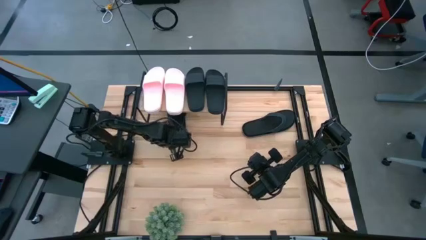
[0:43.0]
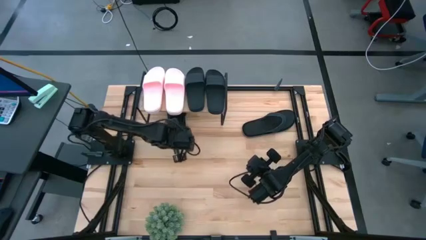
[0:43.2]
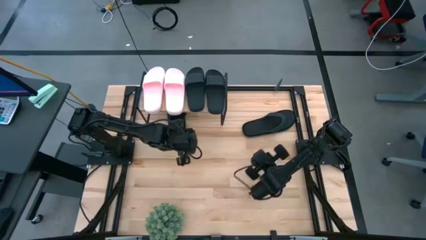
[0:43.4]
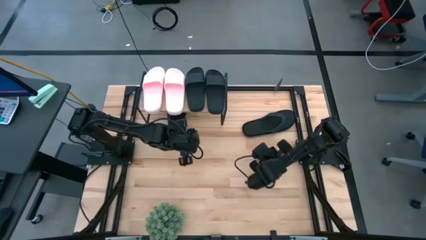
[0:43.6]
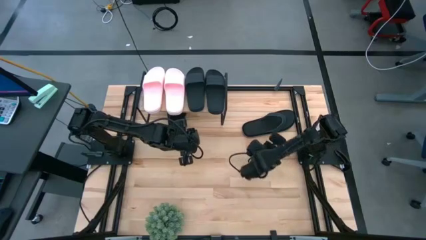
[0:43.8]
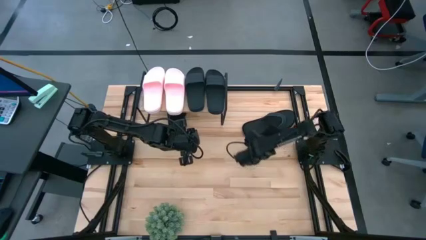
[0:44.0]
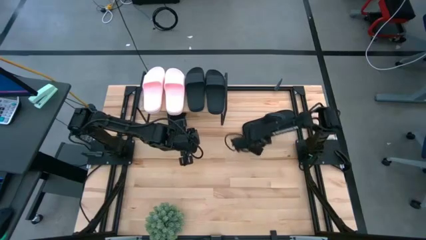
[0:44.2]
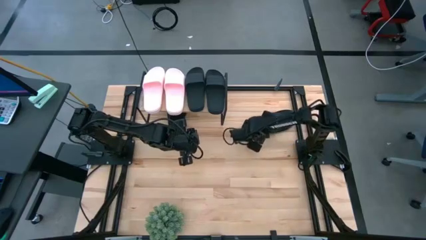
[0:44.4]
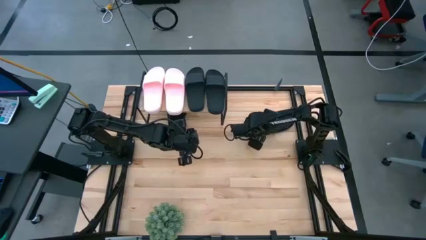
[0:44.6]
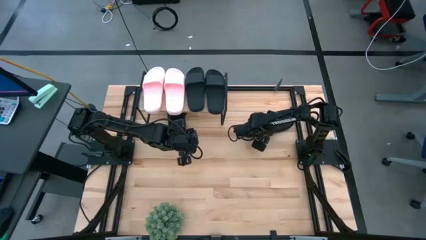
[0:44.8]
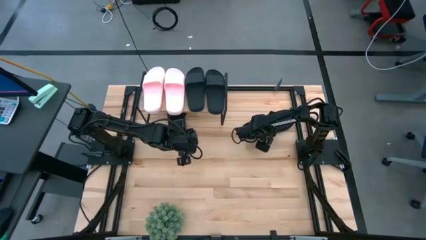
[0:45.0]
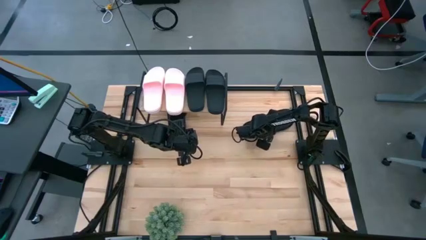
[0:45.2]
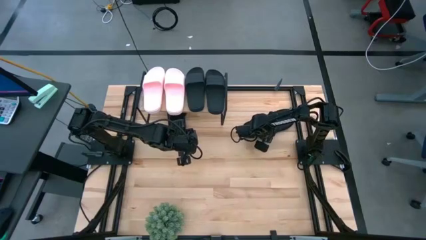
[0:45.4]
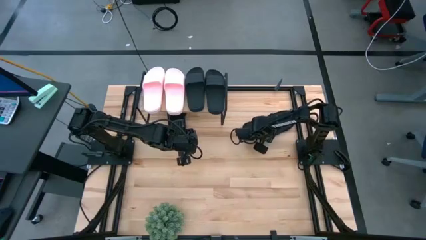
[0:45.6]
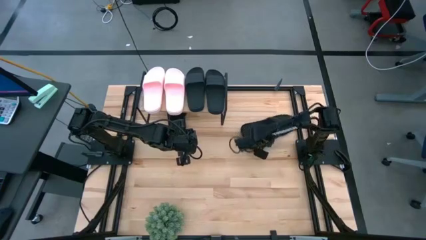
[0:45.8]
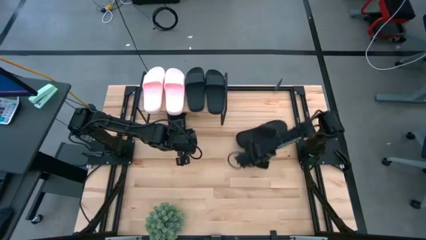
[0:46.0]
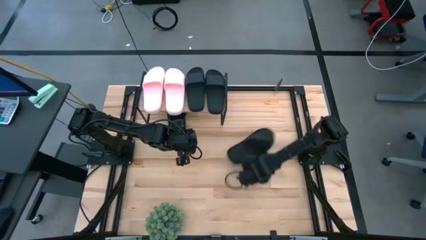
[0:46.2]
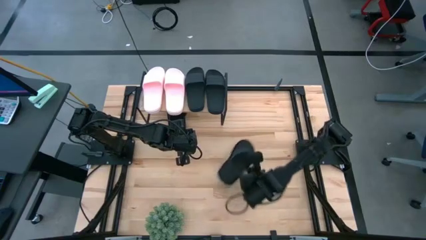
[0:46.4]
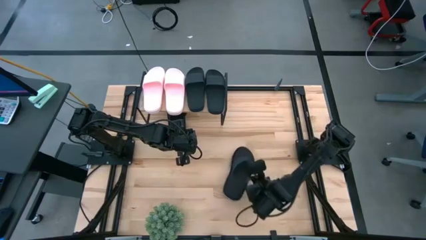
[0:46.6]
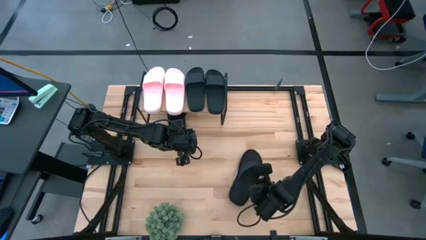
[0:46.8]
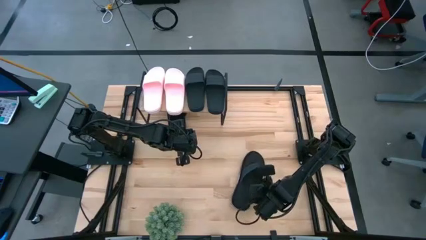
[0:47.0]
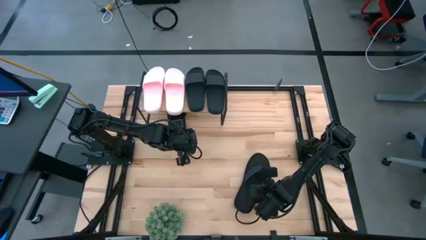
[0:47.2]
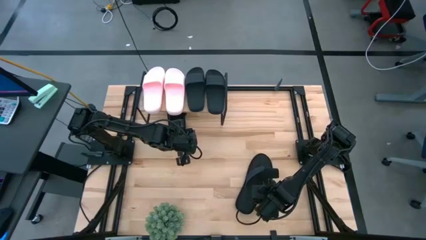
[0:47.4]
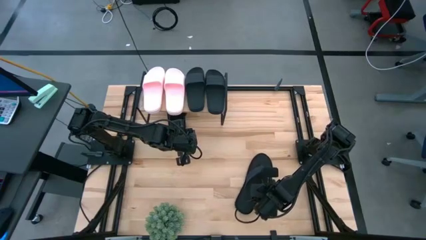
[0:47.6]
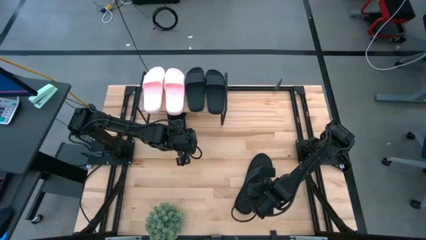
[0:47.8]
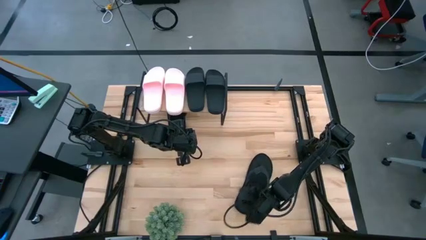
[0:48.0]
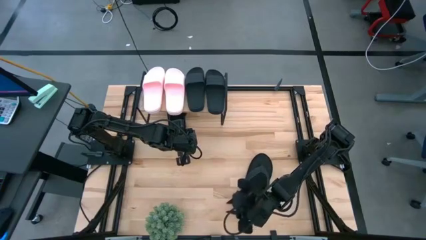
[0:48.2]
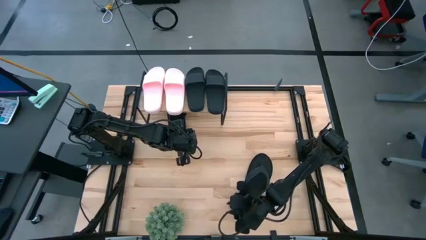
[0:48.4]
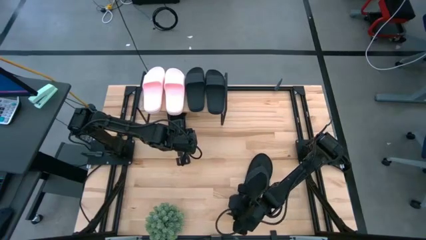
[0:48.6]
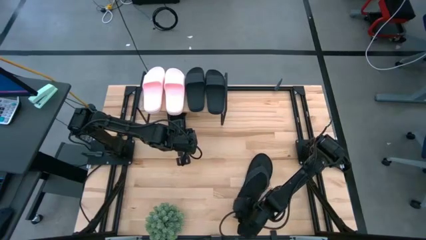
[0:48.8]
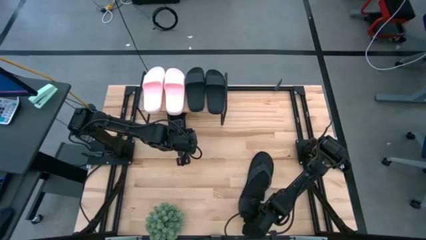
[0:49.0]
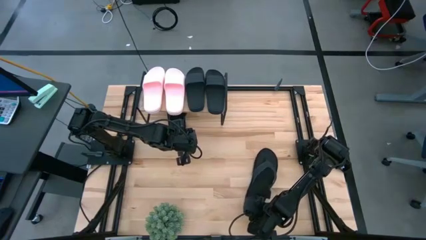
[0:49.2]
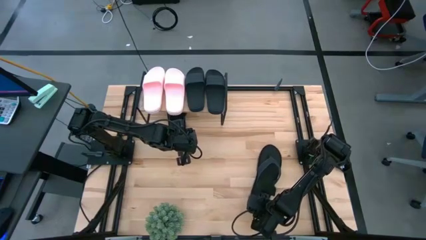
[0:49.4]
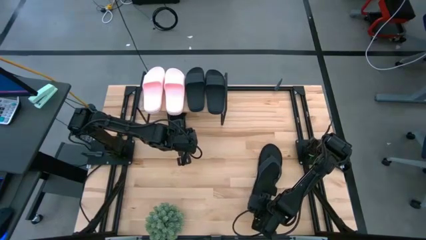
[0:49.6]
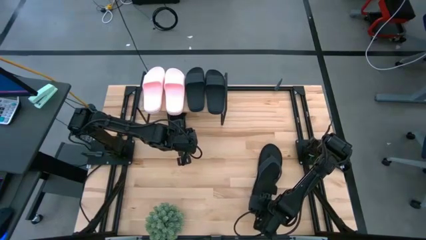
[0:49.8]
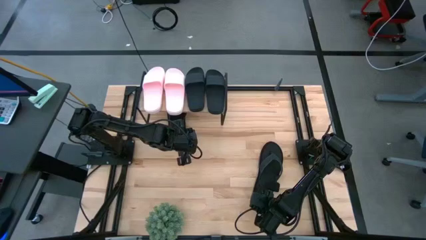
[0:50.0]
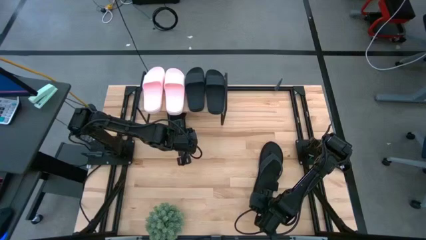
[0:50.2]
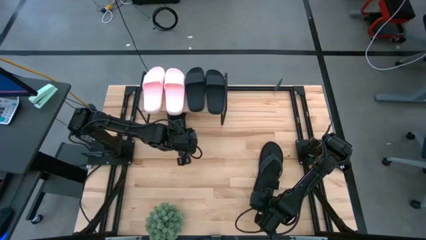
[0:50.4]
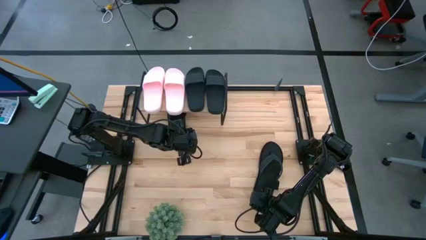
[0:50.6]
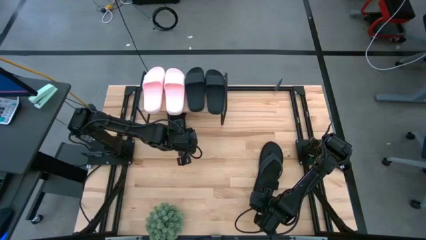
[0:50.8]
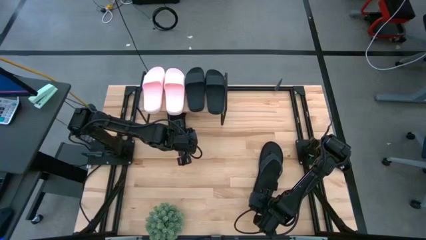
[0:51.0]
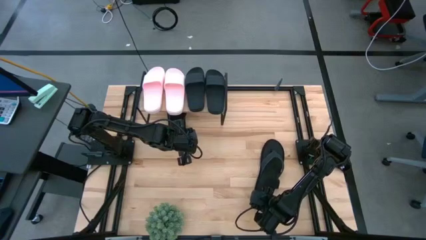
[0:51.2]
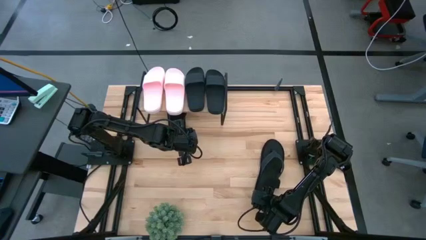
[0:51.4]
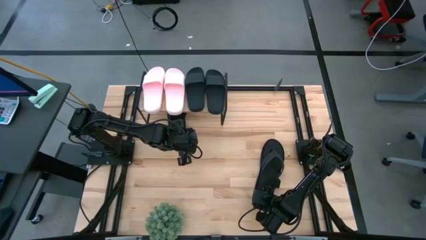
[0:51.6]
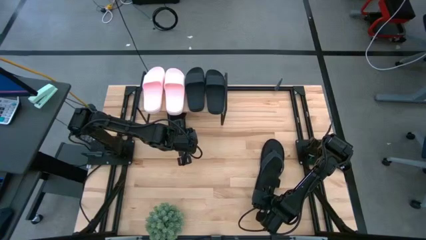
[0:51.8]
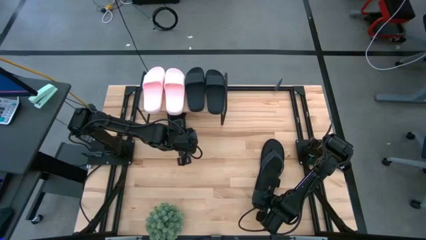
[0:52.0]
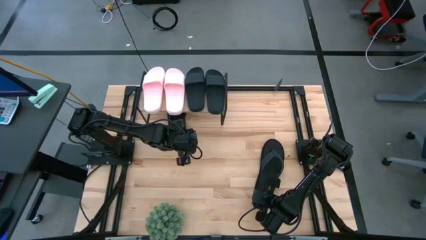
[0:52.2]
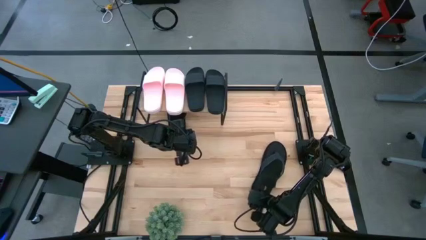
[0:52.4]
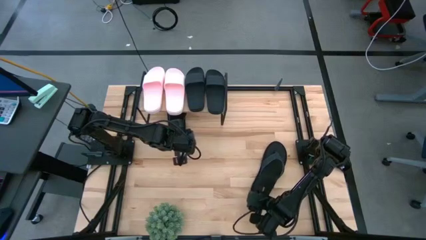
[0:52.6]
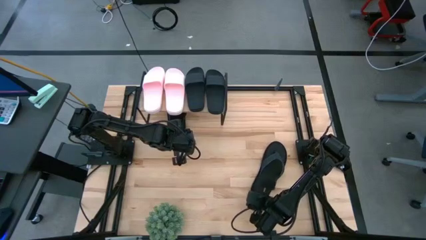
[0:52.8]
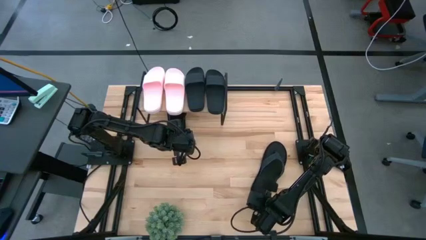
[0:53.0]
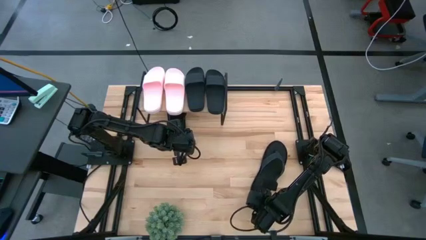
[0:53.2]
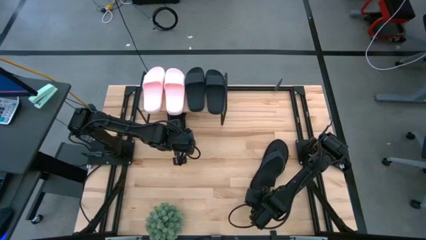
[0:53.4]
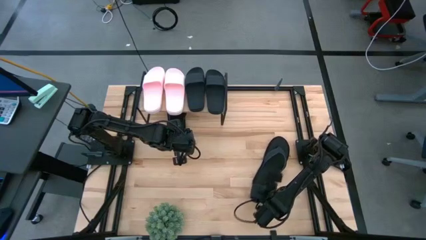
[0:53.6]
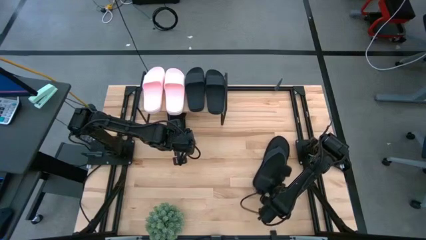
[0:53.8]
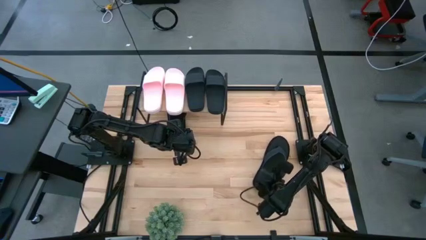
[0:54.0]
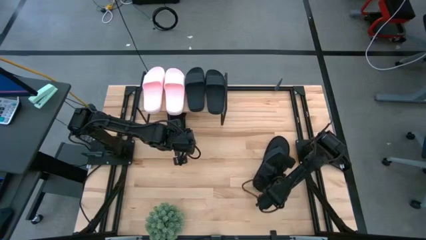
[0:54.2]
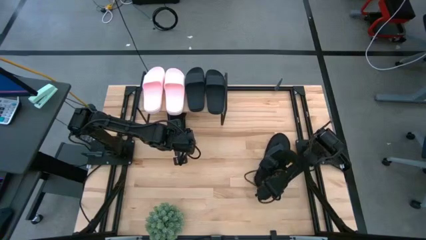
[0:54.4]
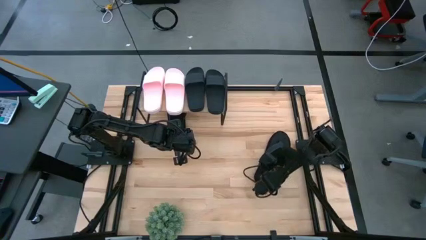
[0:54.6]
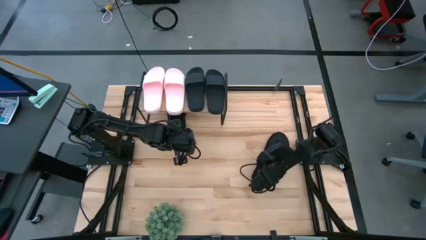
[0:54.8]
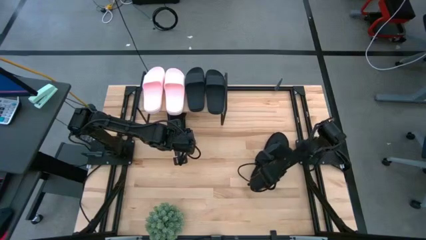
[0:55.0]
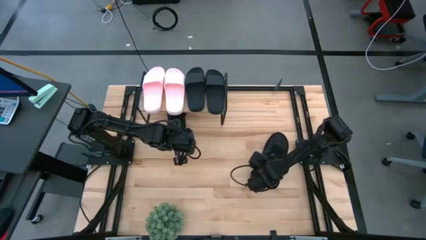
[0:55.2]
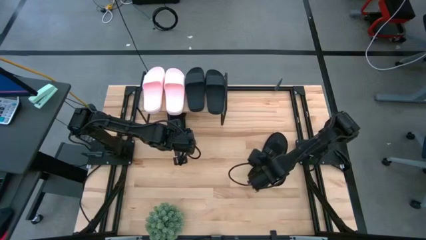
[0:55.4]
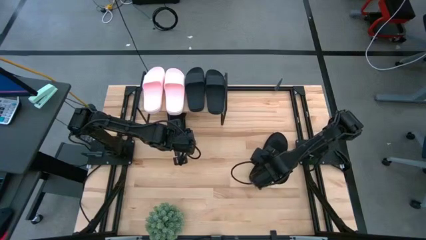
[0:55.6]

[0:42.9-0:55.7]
Task: Pick and place slides into the shelf
Put the black slipper under the shelf

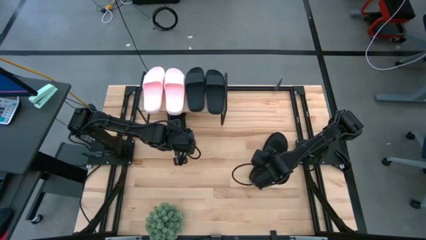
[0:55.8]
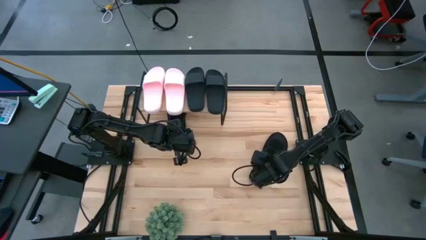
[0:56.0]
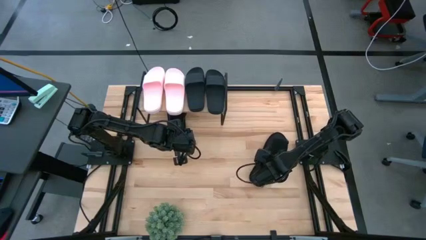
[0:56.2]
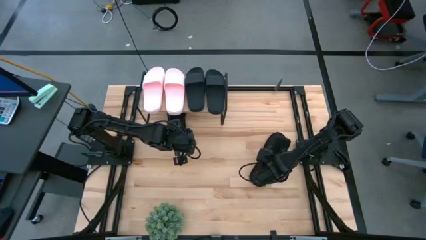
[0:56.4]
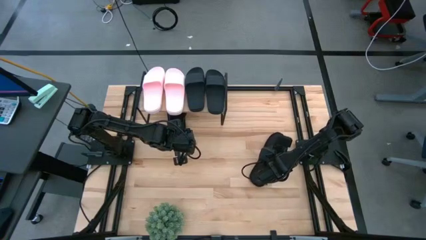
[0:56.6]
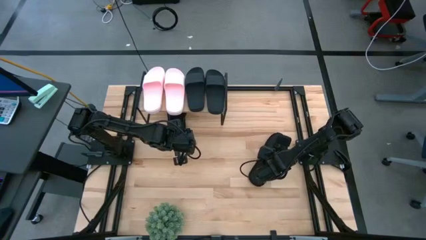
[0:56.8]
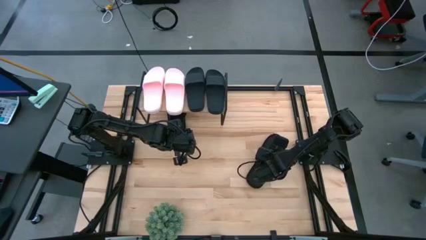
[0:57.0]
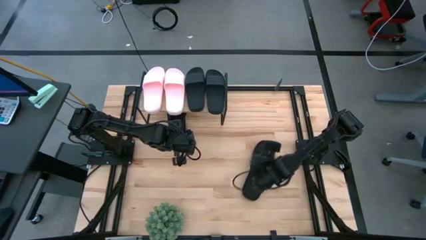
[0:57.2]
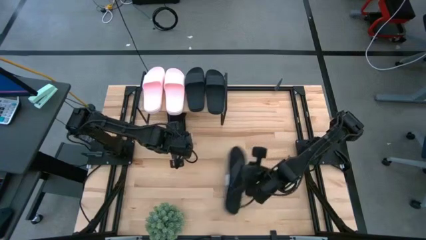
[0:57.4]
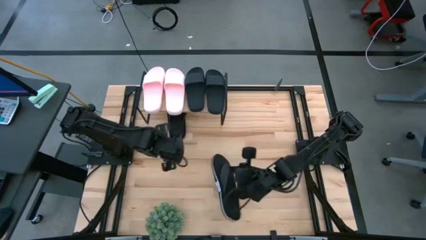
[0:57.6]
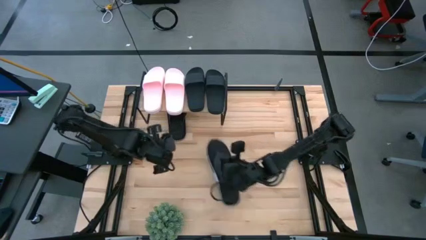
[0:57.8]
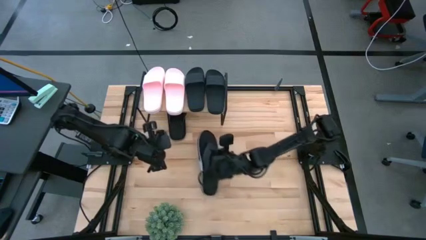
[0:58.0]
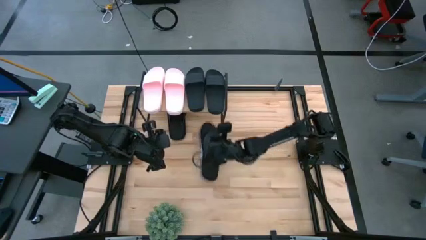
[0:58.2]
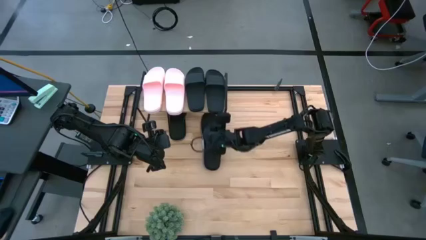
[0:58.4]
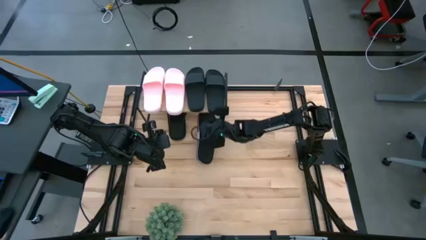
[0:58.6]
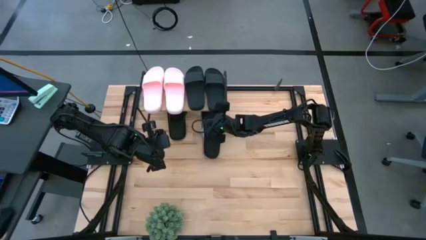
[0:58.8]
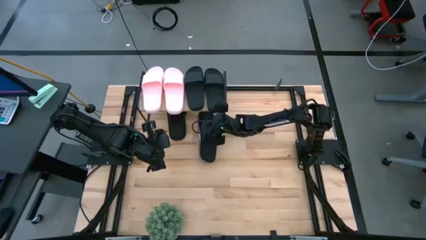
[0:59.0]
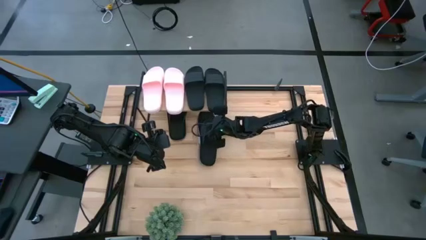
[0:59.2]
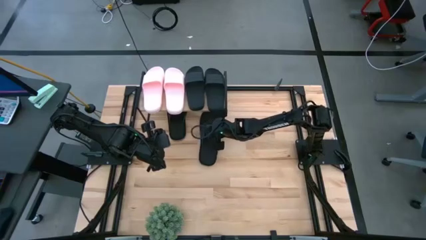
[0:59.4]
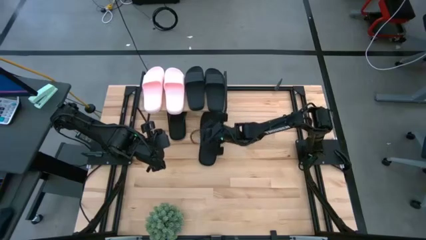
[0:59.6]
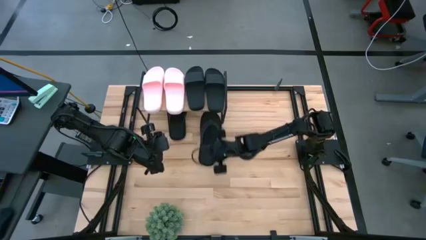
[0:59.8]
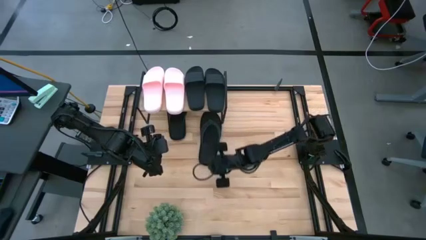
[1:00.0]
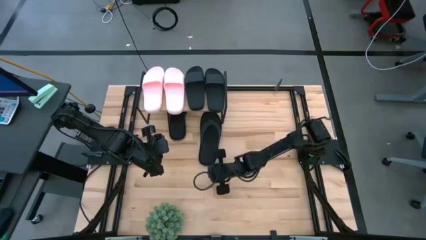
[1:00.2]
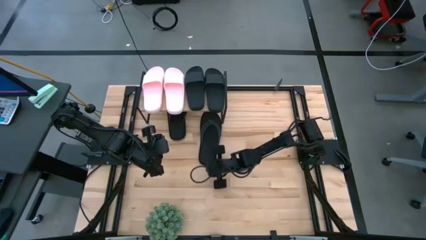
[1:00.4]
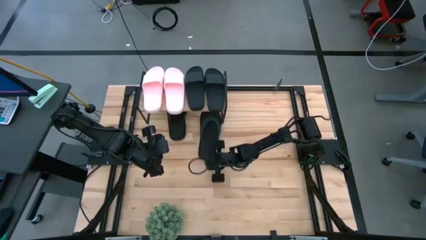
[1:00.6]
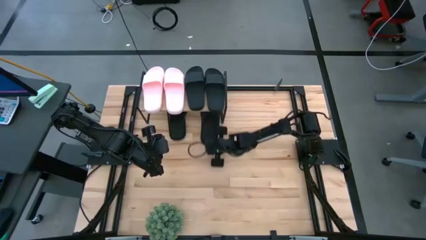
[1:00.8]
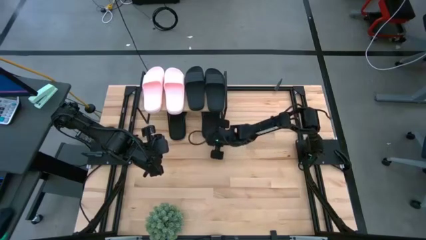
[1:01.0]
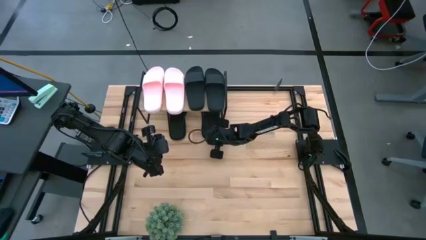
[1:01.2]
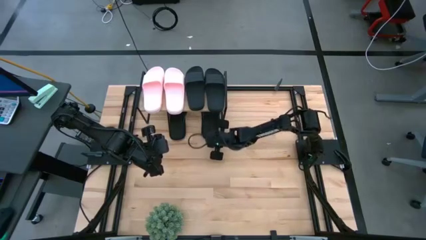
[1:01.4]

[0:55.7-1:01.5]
Put the right black slipper under the shelf
